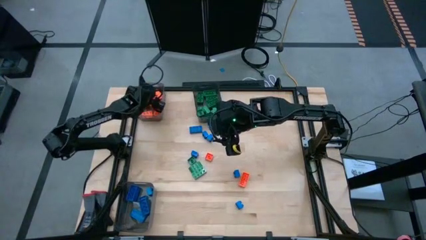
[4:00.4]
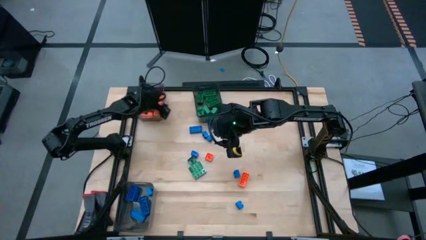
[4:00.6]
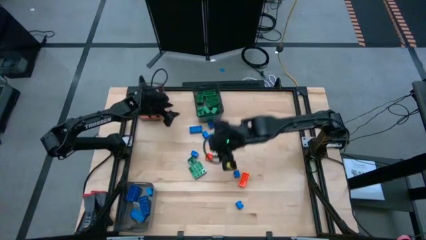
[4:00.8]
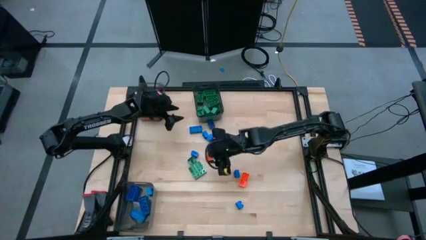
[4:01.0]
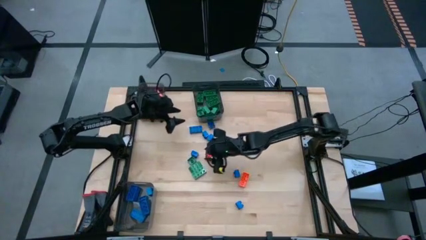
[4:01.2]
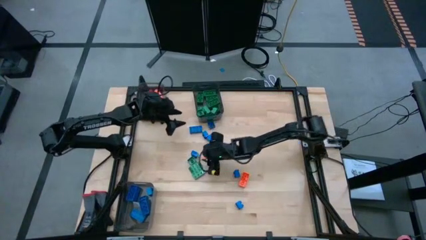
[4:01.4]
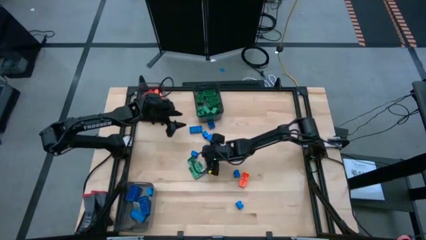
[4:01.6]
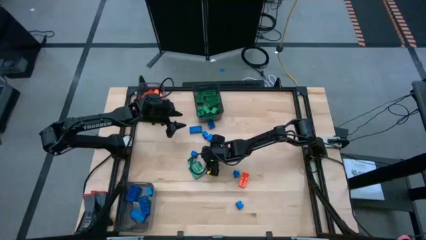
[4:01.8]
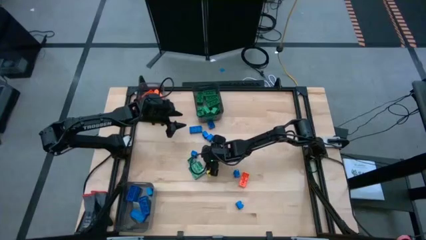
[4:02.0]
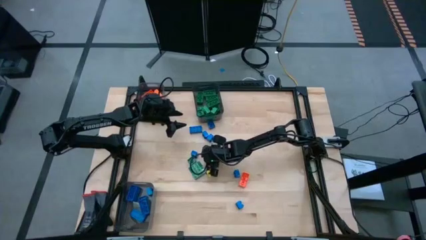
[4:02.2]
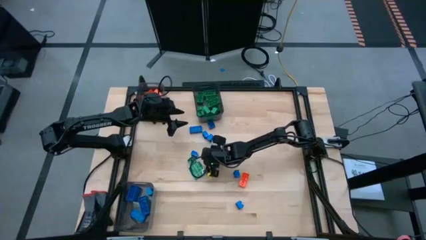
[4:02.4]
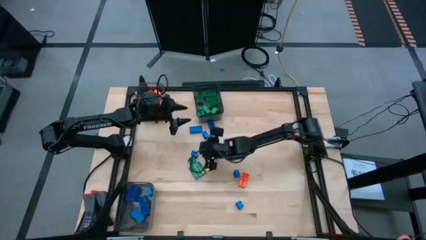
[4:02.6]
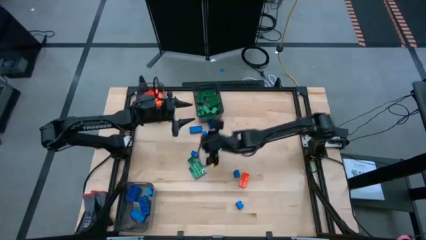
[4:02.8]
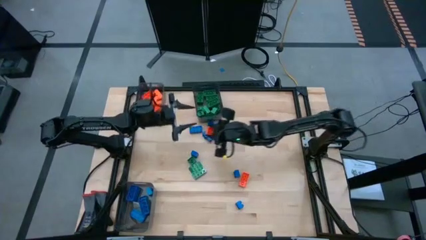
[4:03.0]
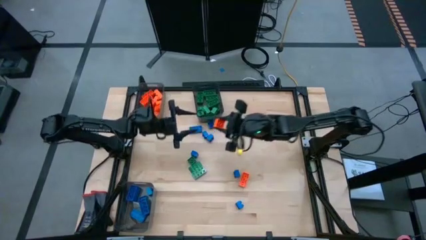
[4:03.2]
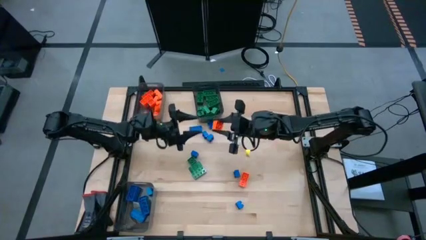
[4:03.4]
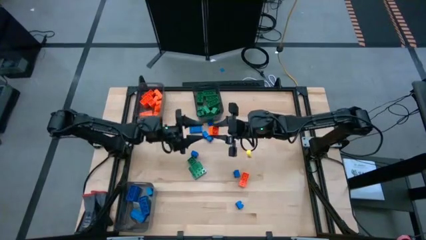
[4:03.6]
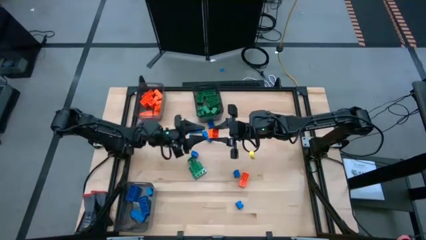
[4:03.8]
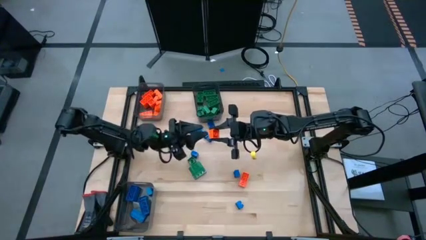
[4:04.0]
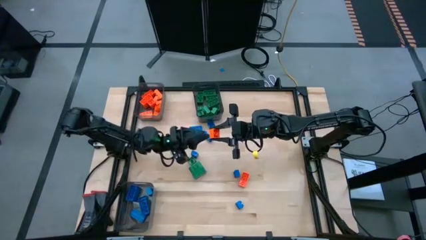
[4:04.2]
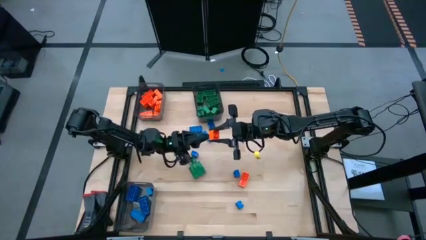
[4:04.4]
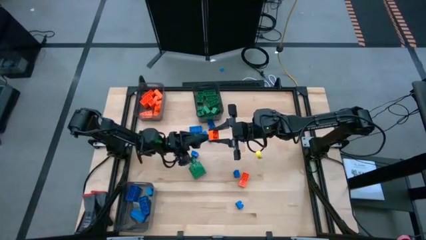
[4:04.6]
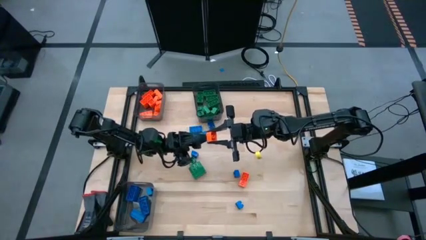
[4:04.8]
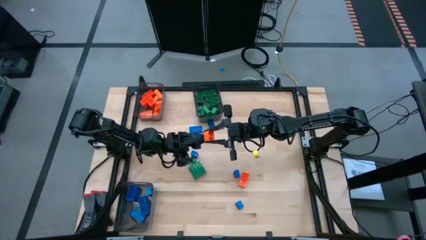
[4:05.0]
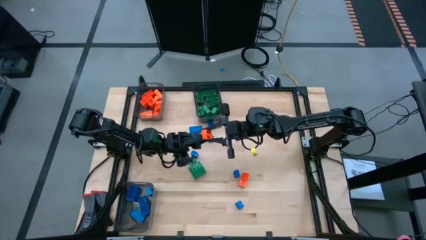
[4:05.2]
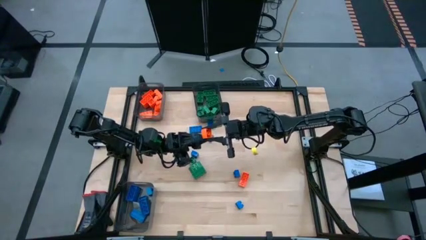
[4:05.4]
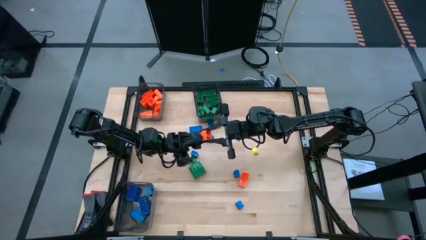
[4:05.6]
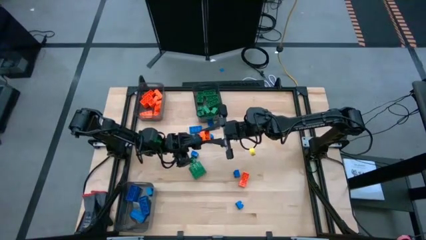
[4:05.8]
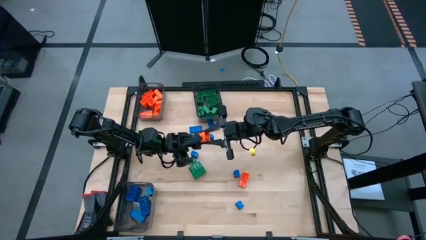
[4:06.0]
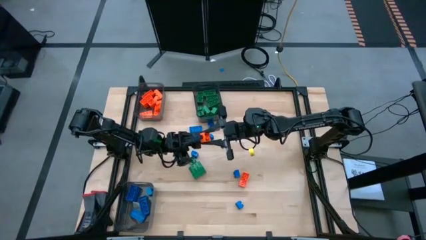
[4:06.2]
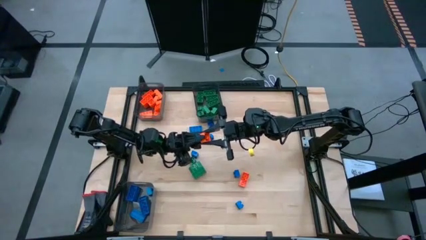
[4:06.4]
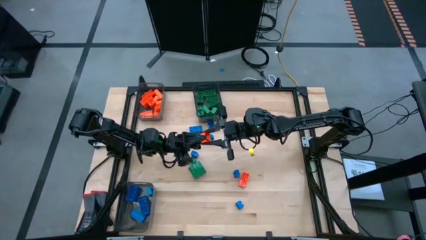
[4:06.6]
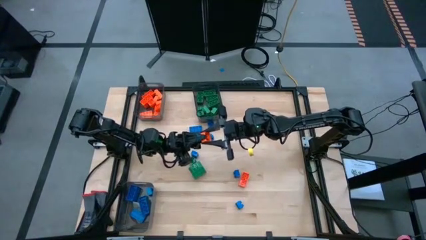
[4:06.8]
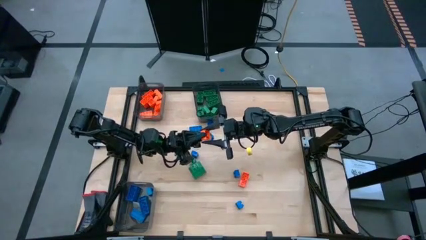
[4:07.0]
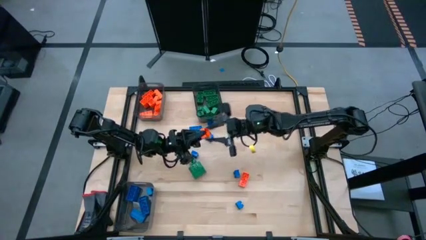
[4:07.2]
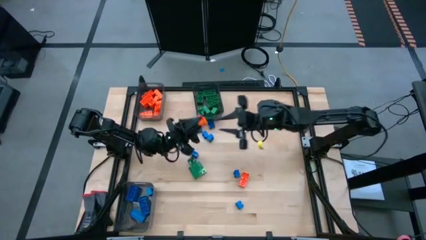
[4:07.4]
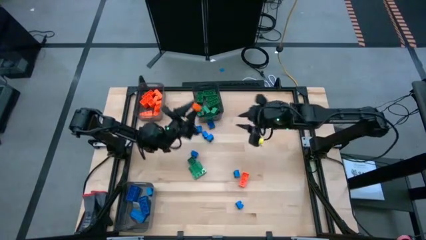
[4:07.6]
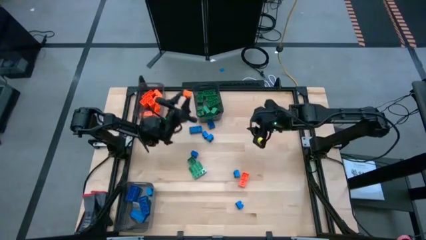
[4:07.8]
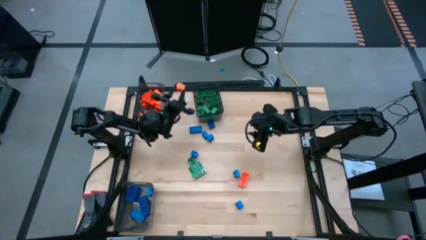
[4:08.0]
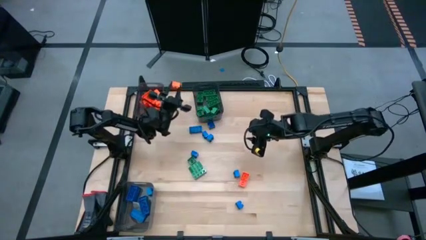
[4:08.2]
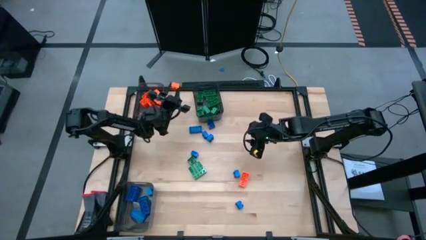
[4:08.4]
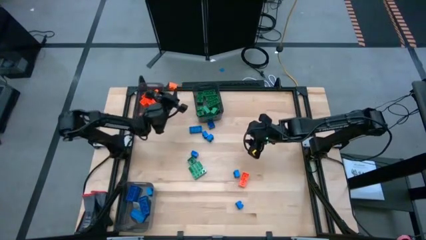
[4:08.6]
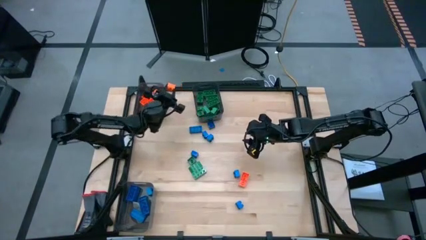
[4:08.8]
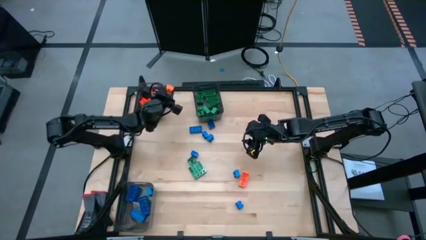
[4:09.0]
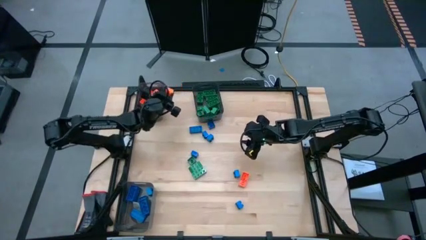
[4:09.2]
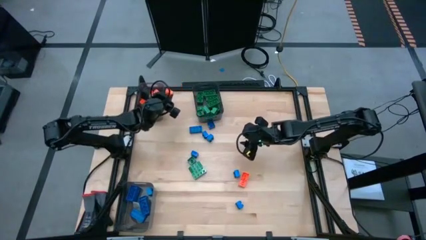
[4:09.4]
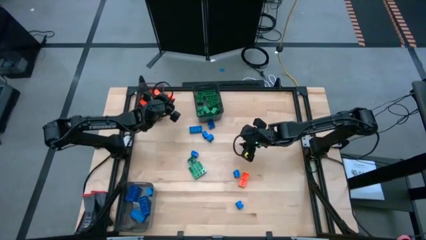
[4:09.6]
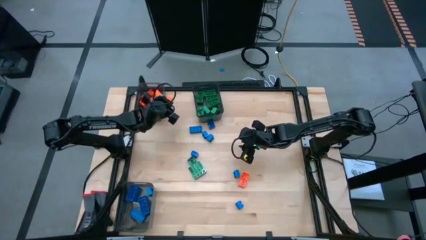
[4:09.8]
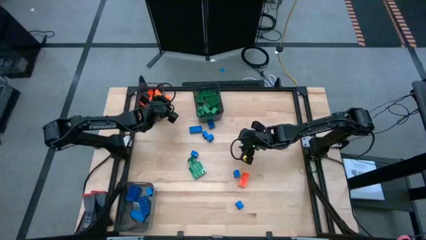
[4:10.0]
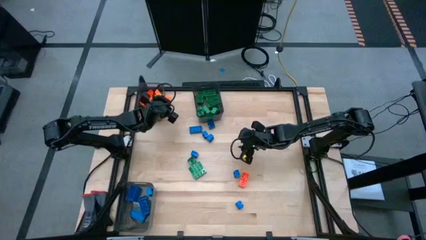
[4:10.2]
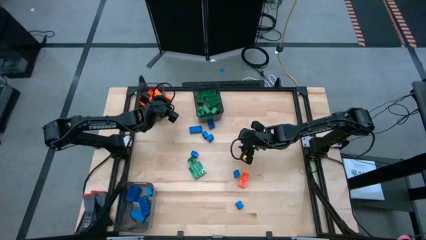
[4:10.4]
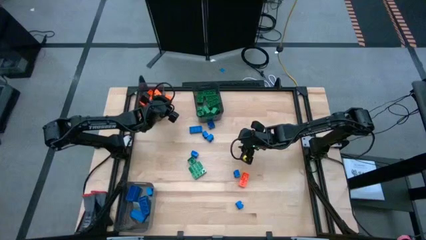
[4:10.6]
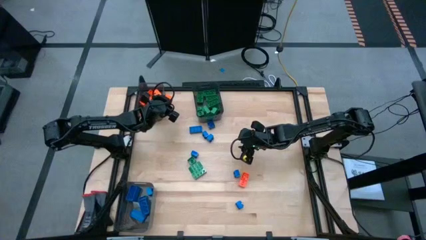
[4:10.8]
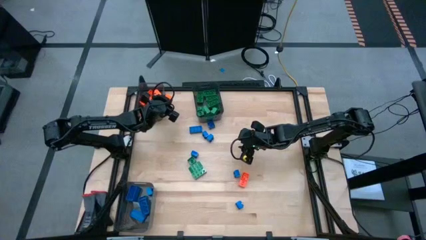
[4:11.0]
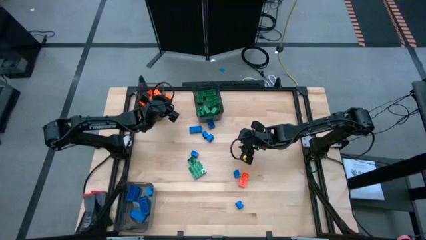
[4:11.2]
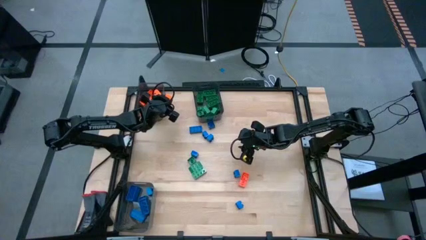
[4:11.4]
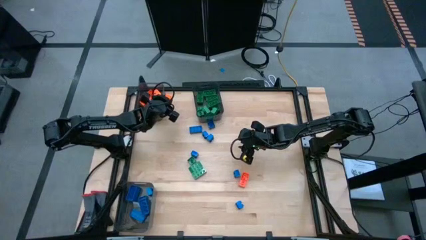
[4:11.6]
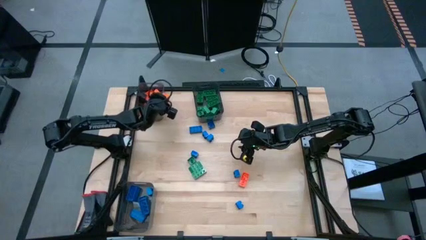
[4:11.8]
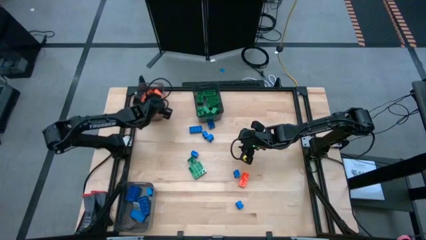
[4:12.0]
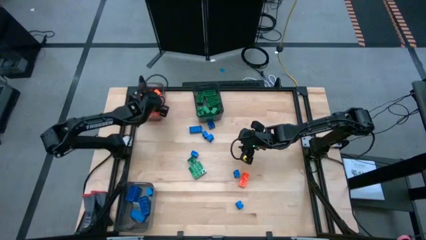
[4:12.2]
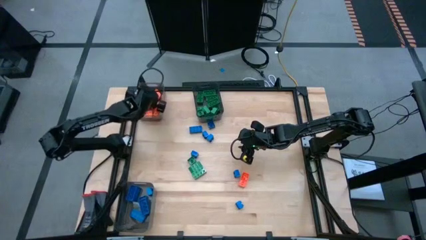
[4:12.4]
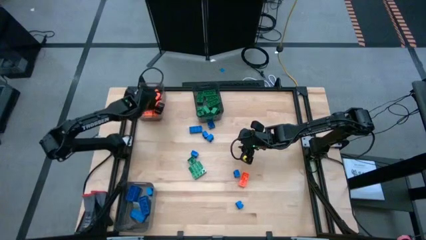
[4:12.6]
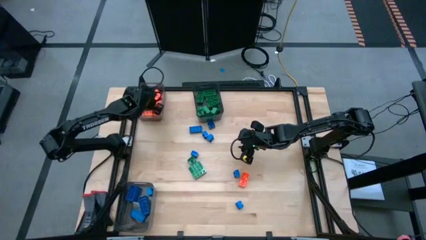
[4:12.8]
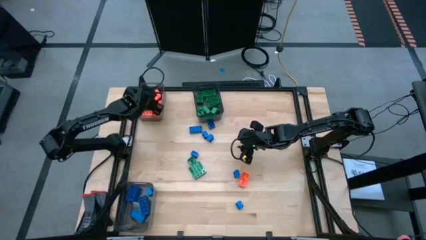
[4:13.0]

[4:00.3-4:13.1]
Task: Sort blocks
Put the orange game piece into the top left black transparent bin

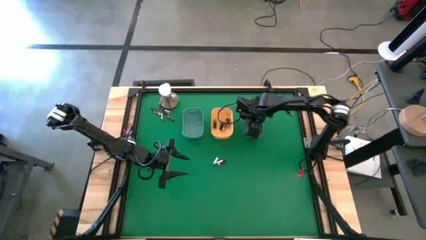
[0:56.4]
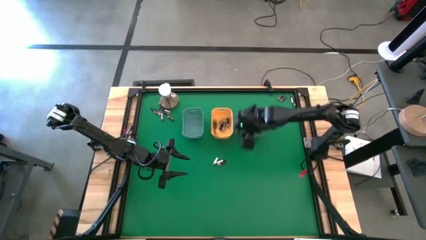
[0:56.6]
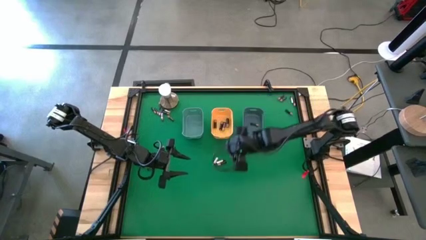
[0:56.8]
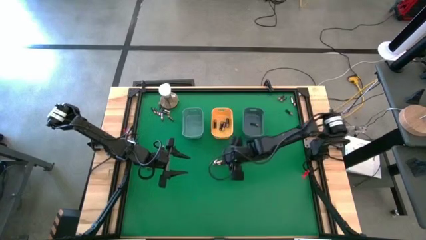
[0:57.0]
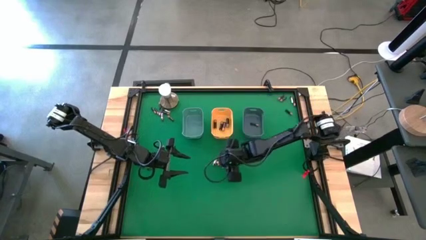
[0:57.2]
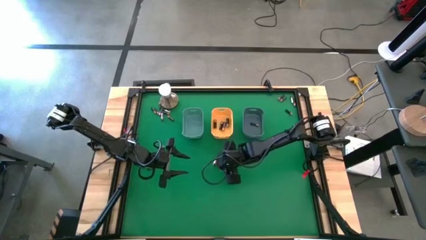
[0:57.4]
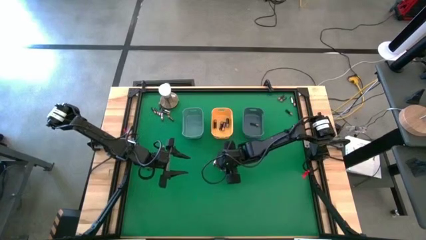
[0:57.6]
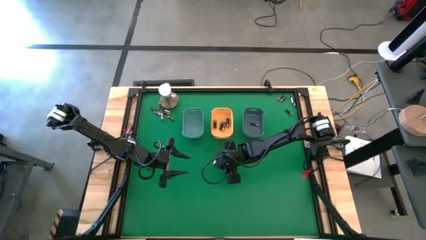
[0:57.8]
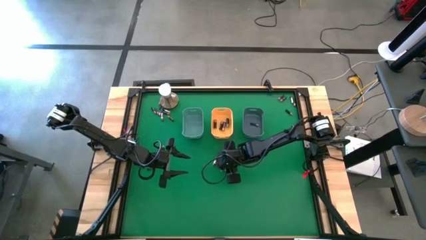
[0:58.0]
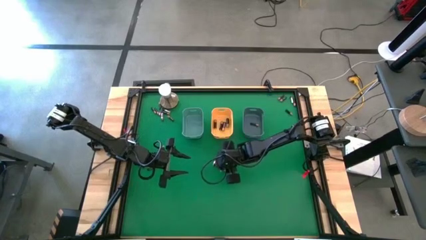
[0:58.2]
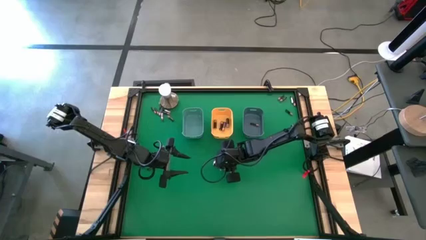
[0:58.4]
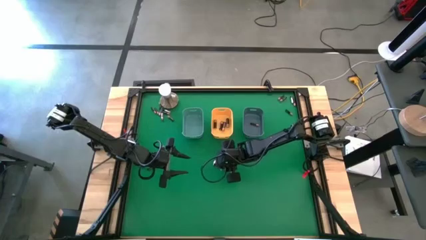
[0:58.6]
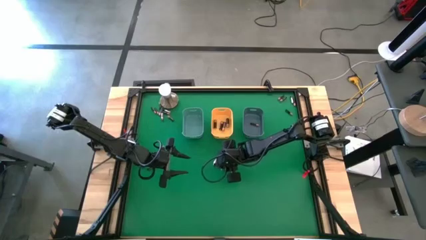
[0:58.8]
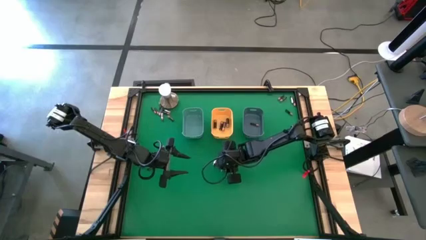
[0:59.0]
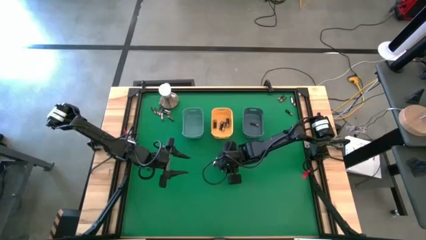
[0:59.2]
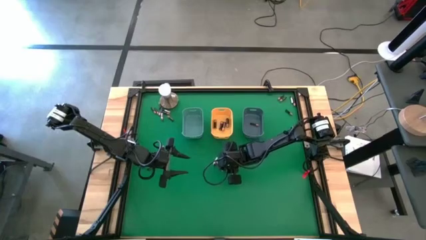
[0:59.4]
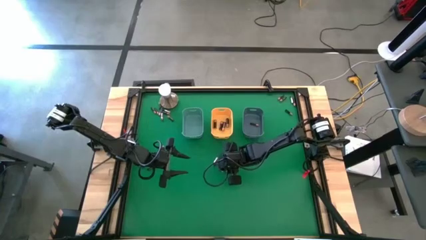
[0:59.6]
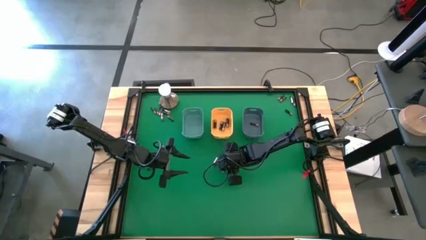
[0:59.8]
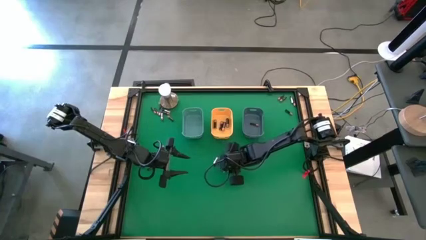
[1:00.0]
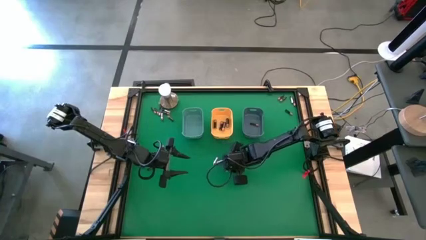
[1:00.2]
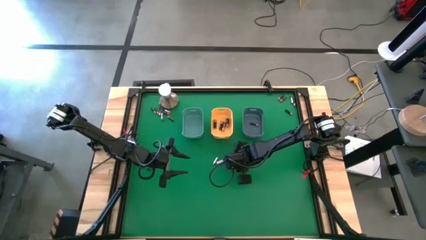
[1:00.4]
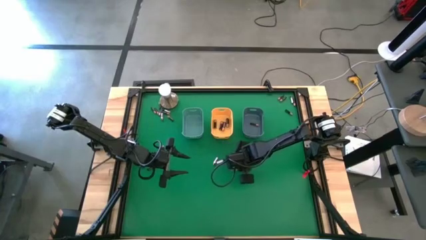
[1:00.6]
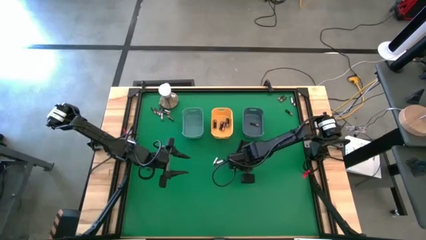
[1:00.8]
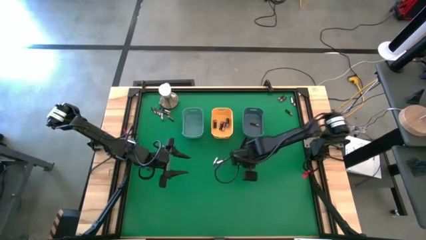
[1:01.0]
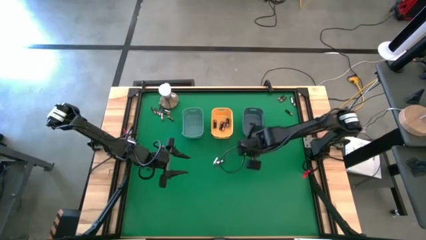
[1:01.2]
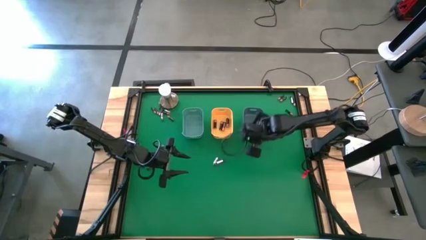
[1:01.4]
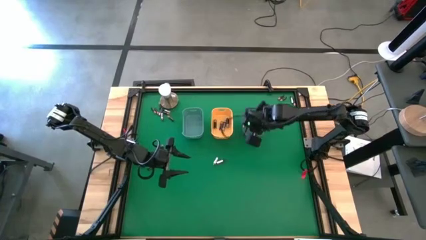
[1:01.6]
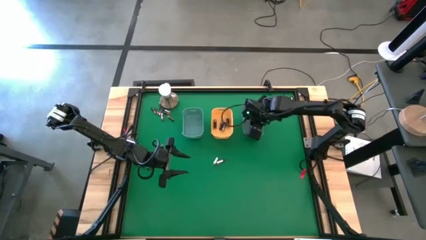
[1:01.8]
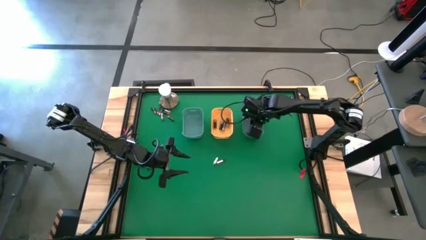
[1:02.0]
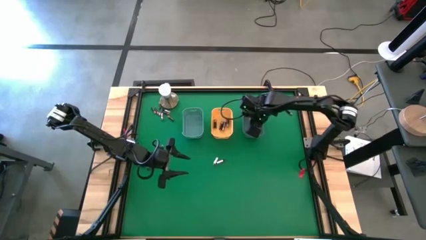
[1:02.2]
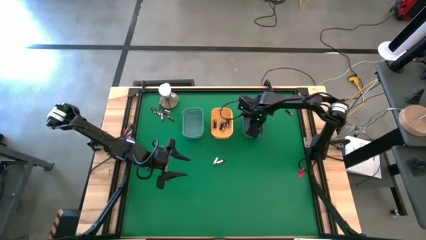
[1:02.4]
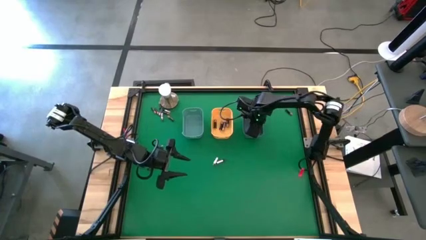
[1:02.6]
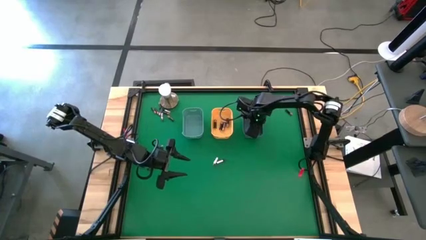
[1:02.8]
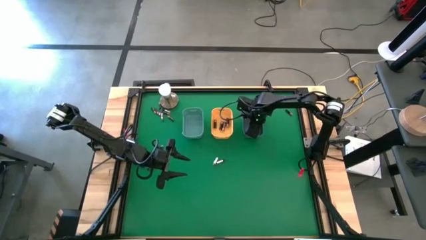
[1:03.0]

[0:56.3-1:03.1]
Task: Sort batteries
Put the small black battery into the blue bin
